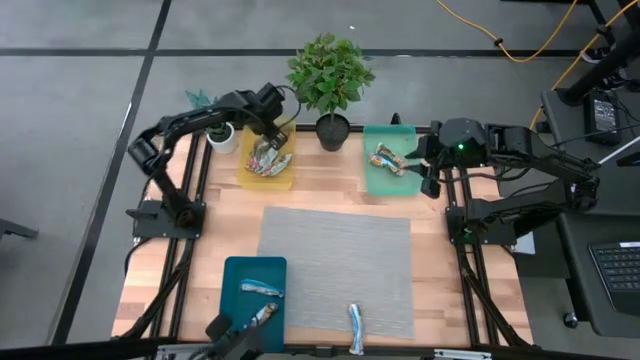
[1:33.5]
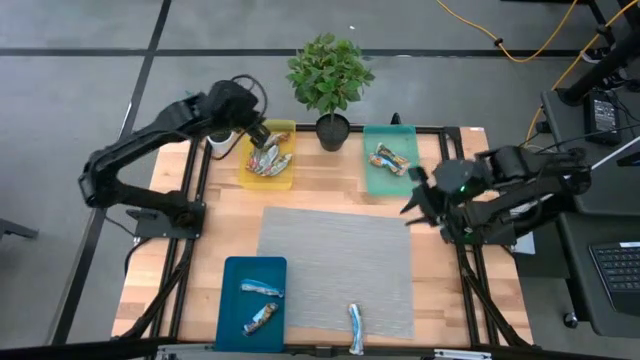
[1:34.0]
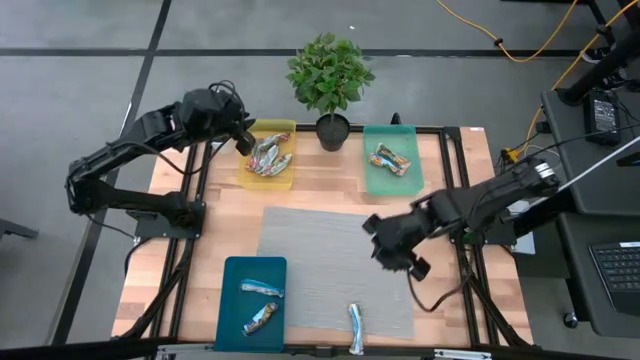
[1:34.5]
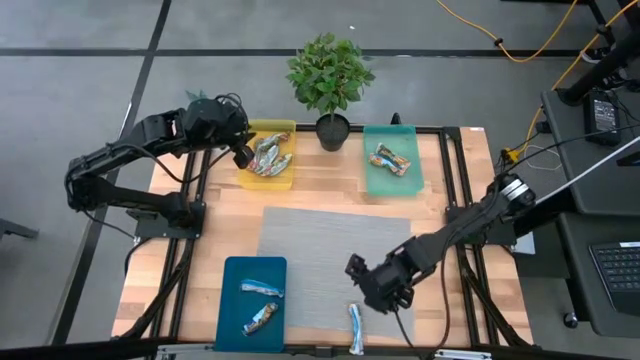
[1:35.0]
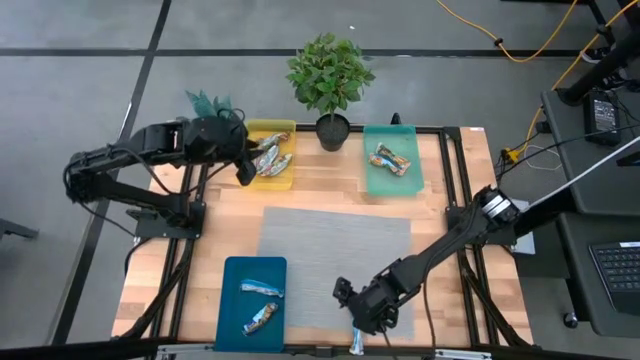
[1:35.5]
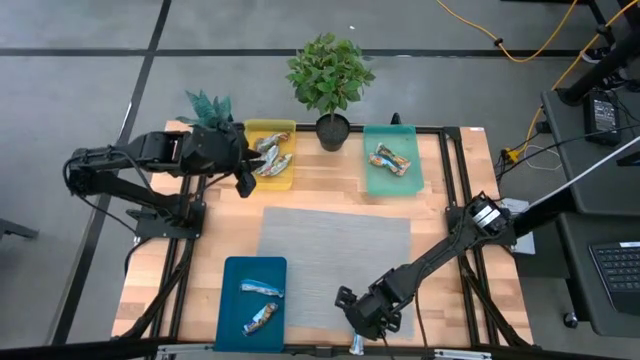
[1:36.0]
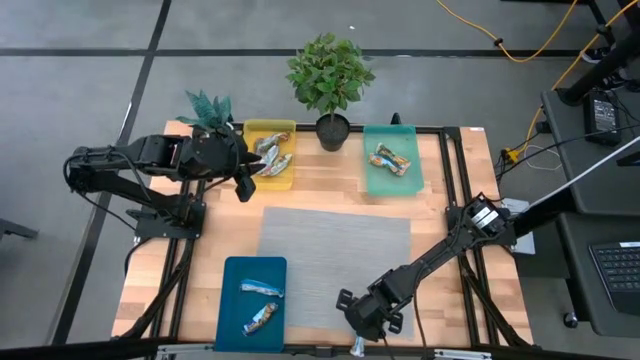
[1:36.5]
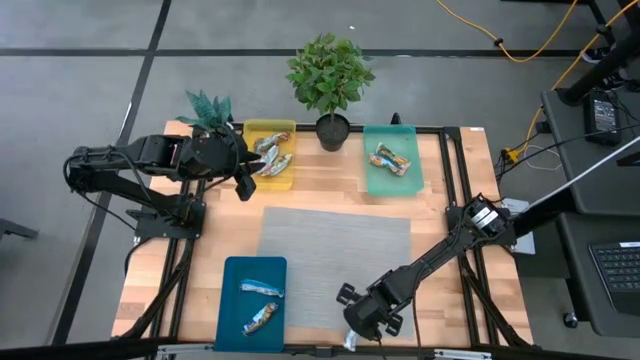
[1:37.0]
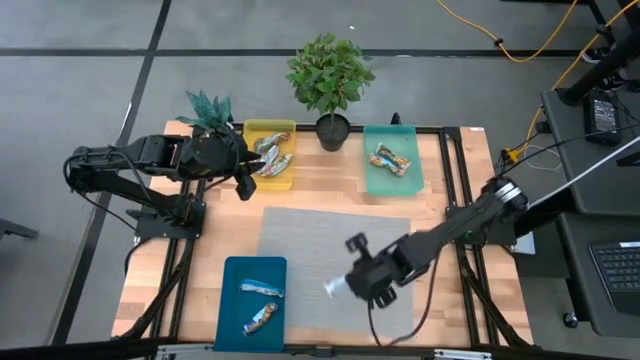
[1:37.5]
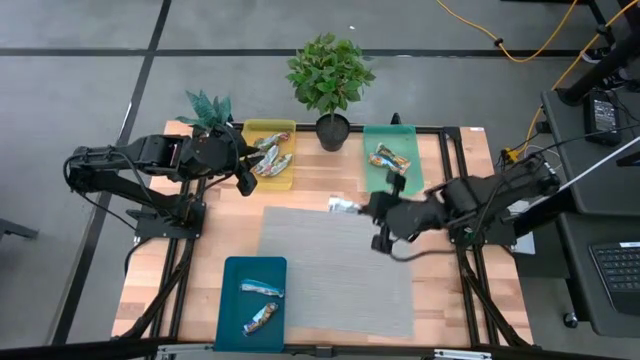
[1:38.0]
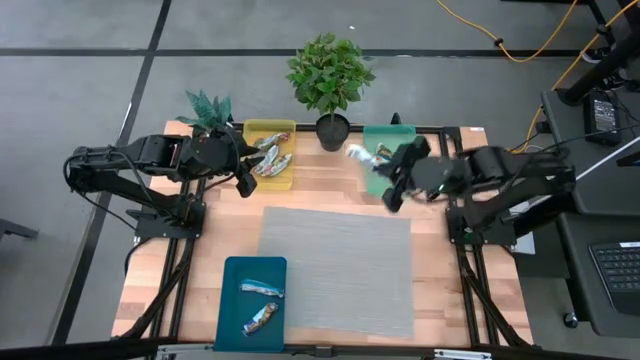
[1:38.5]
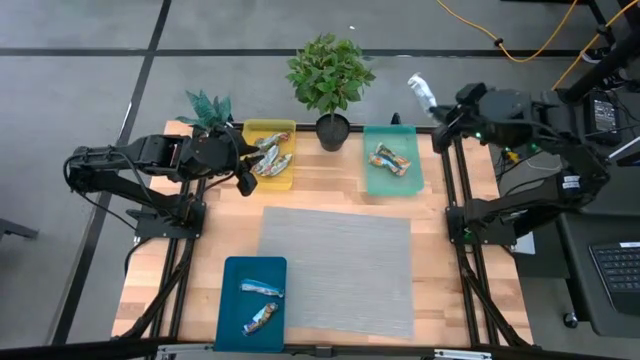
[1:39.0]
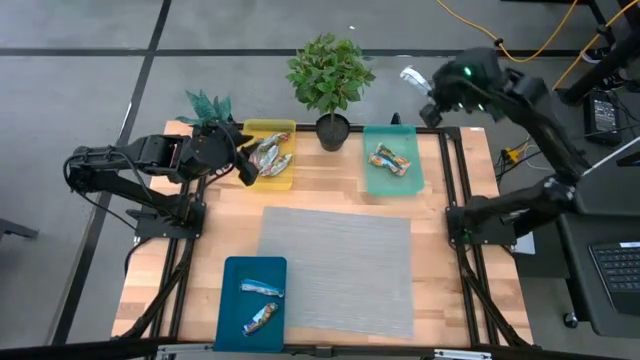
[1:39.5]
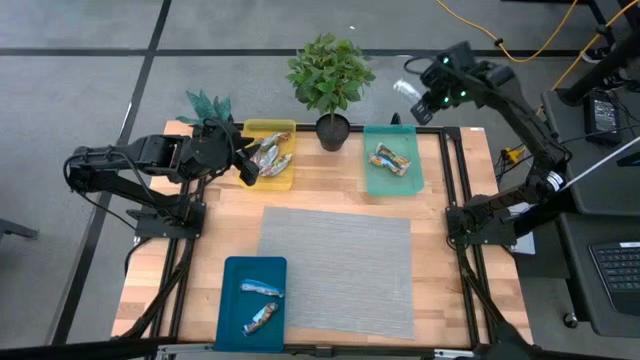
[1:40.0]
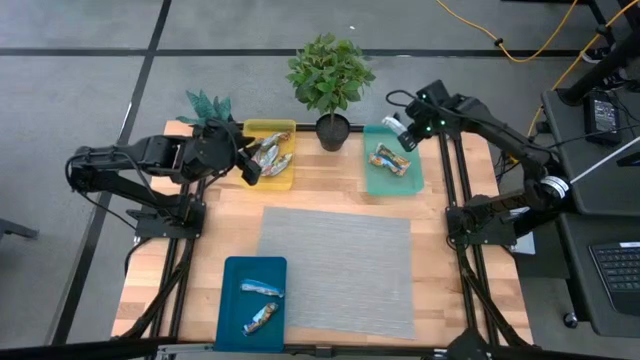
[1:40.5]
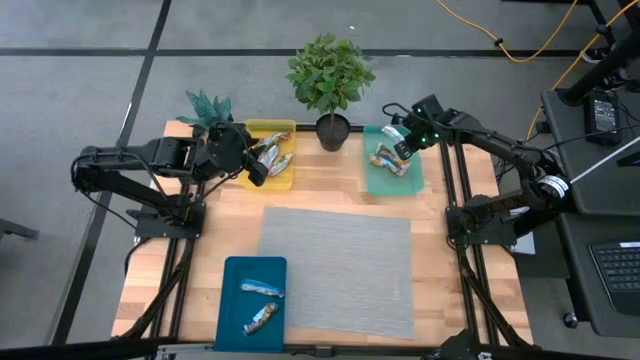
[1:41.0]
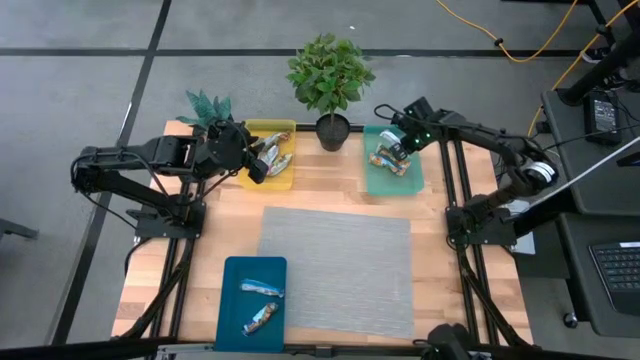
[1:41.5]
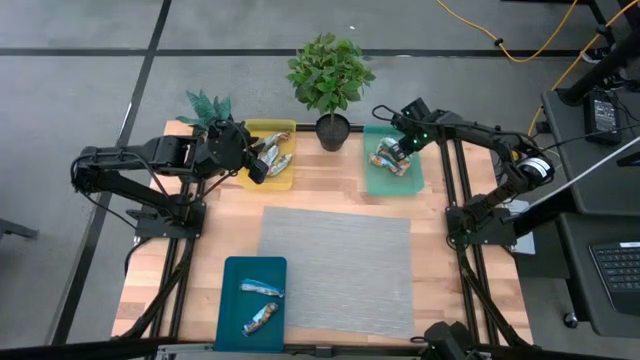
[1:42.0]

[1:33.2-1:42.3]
Task: Pick and place Granola Bars by type
Put the yellow granola bar into the blue transparent bin

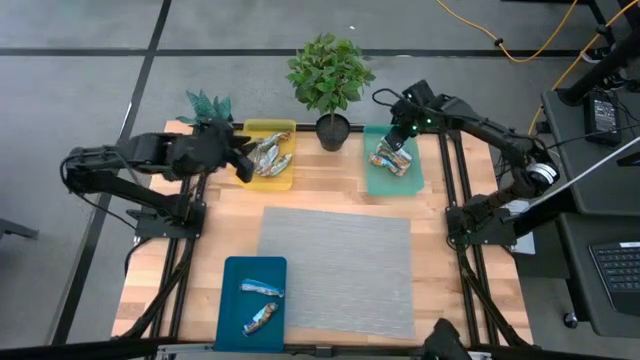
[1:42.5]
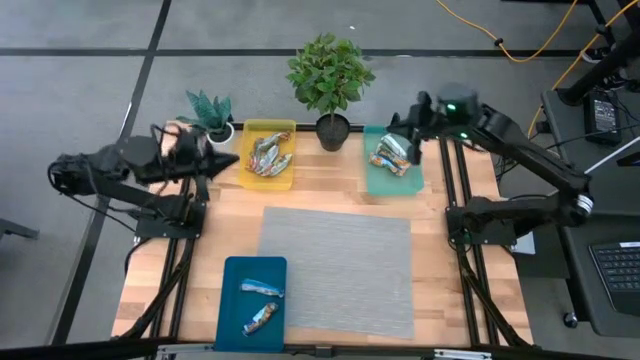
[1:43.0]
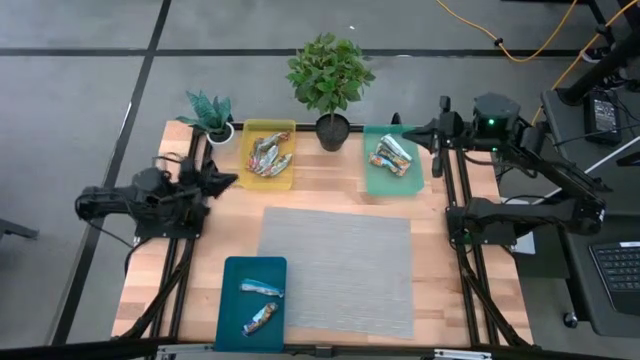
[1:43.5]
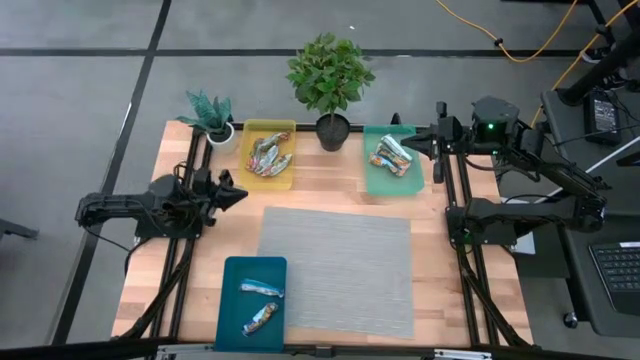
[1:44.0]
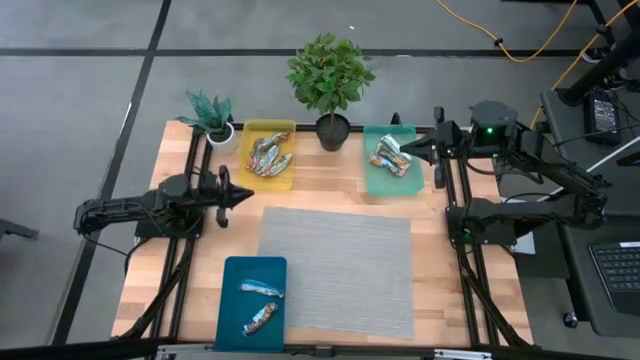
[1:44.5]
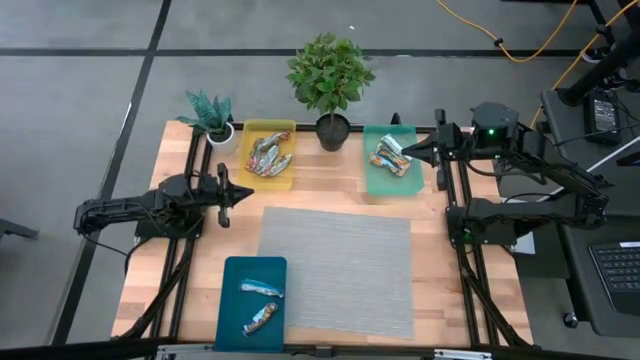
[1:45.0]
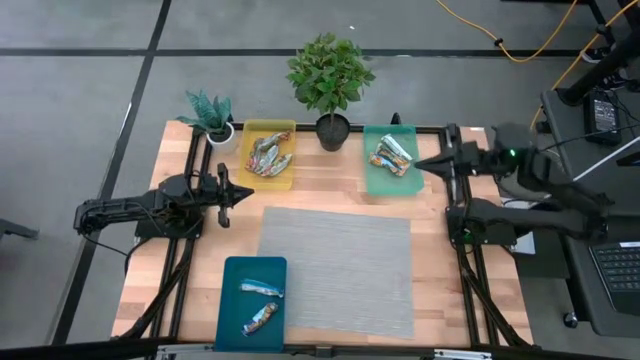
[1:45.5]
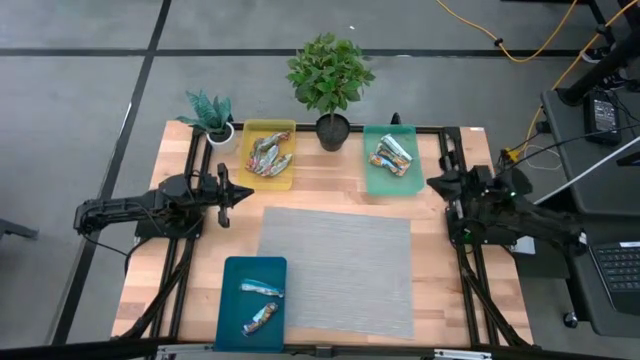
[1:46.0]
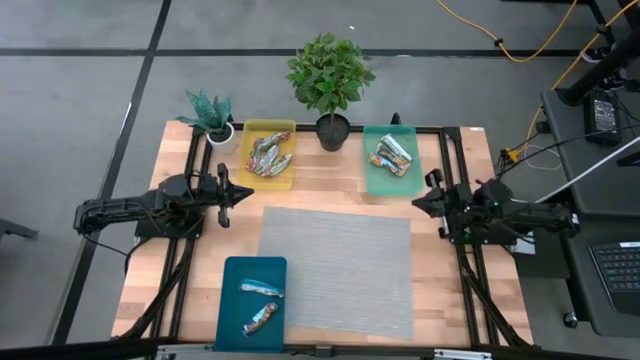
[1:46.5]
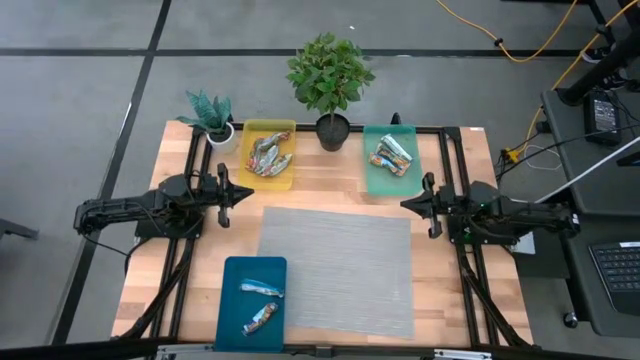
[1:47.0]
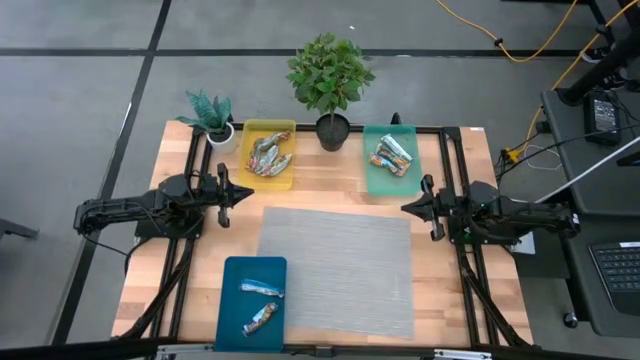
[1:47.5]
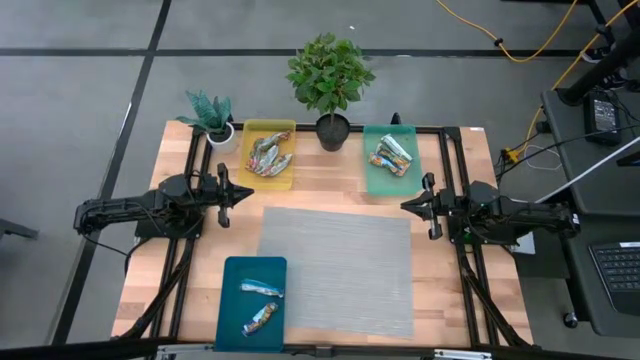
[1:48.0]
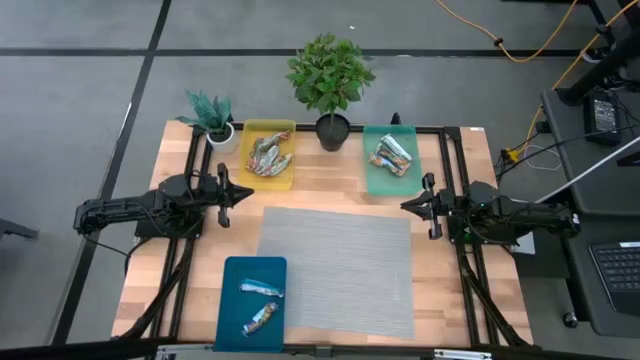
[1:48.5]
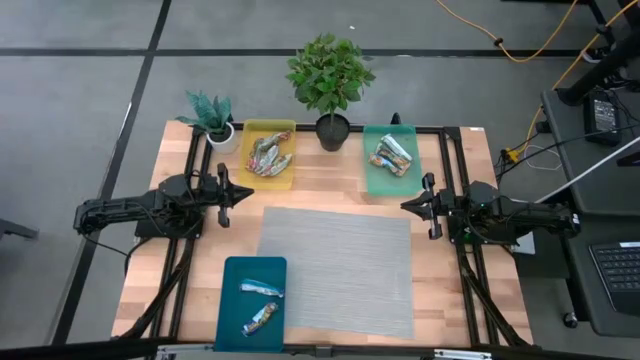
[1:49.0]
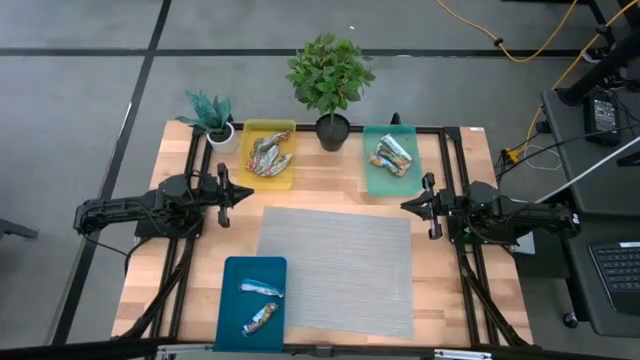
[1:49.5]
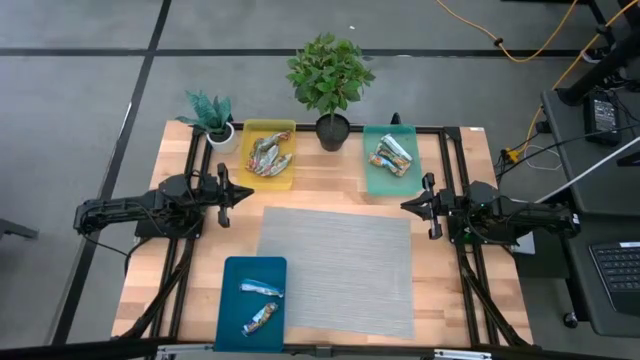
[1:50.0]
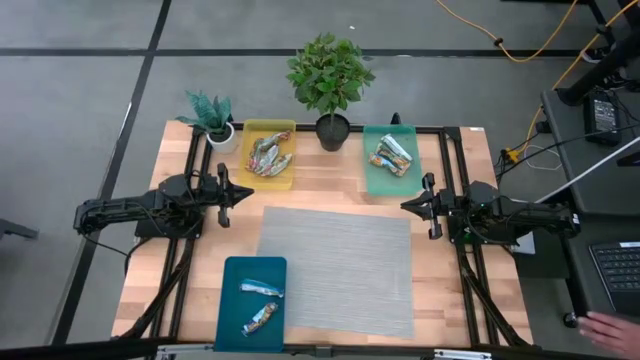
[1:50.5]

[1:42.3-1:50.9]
Return to Home Position

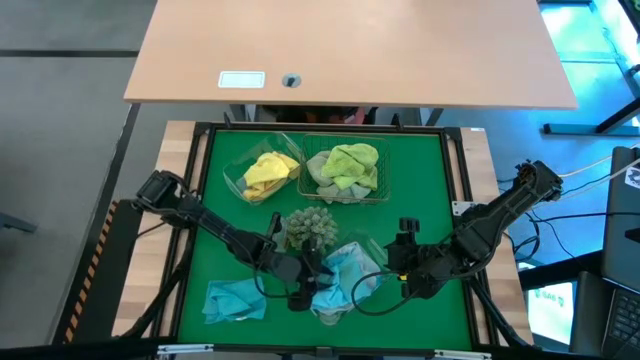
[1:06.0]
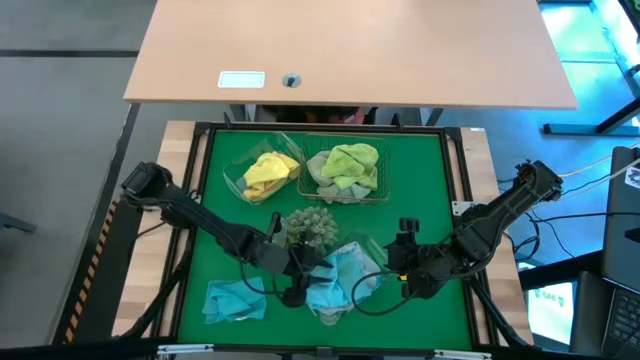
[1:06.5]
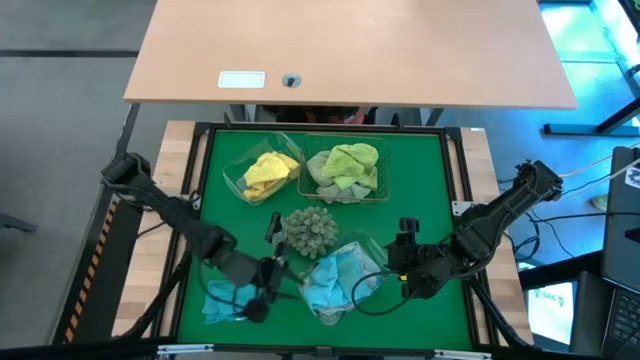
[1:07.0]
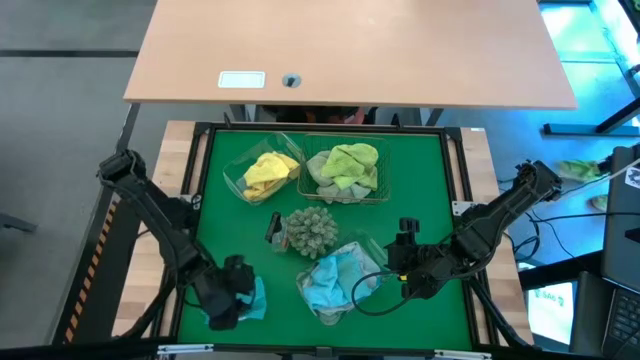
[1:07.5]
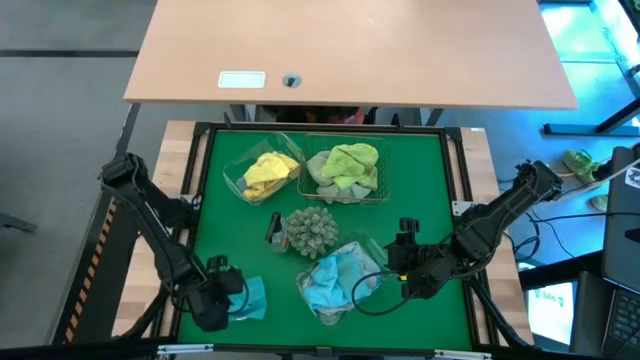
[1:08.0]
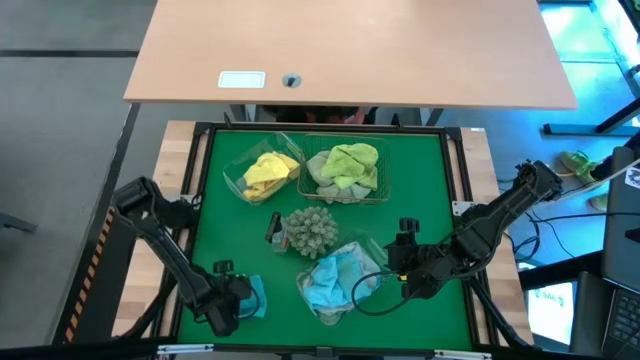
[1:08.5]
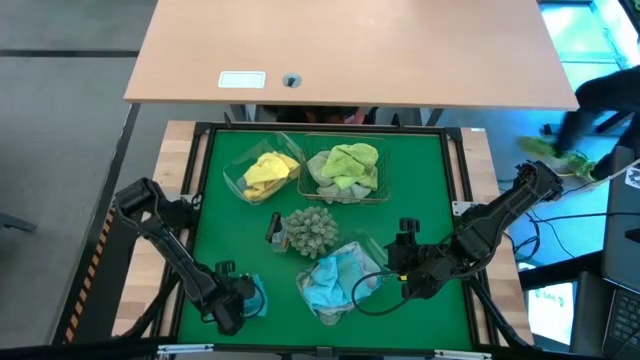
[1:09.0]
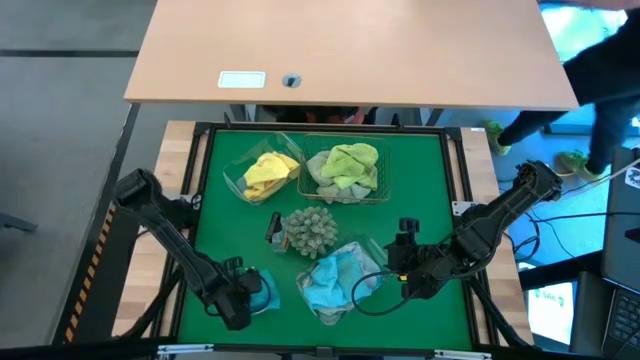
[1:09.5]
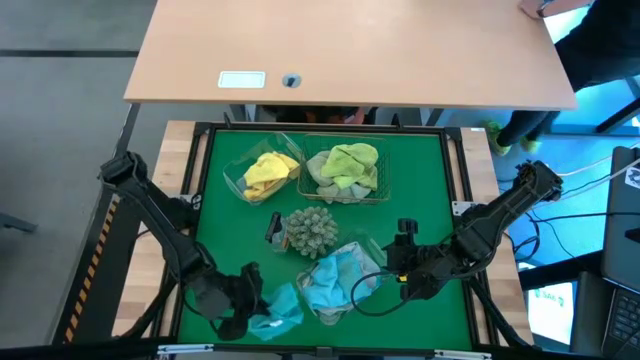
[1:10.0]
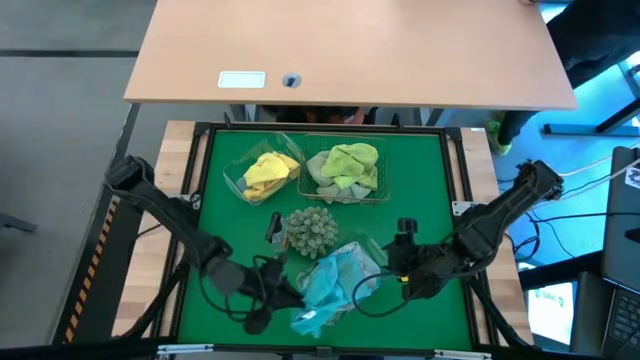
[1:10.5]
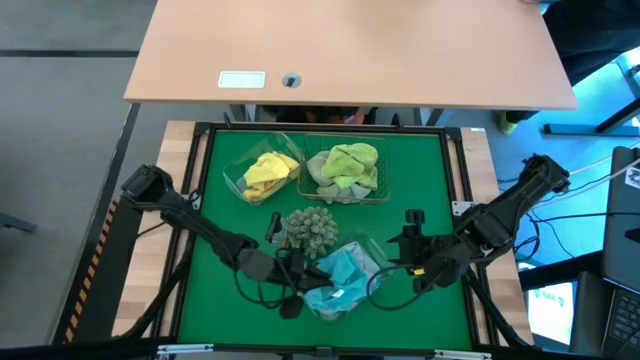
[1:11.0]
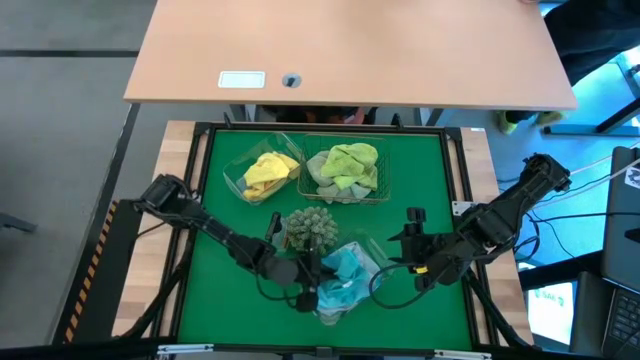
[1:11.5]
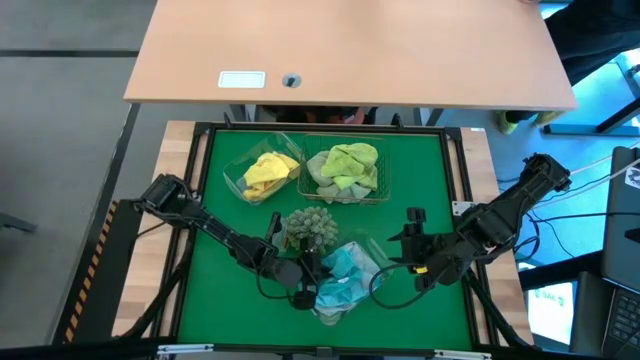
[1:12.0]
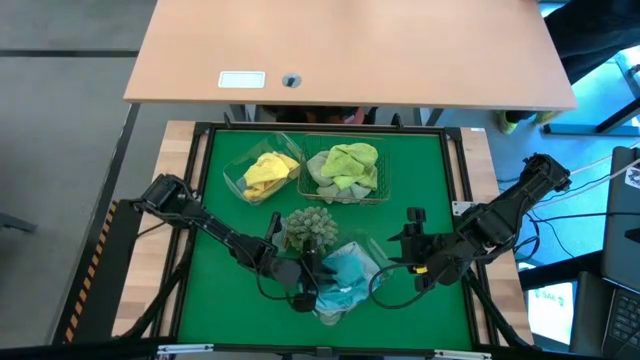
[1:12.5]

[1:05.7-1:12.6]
Task: Sort microfiber towel by color & place in baskets
Put the blue microfiber towel into the bottom transparent bin
